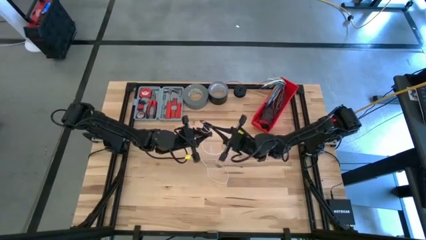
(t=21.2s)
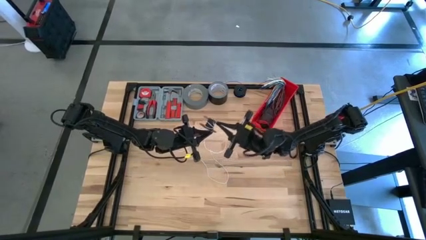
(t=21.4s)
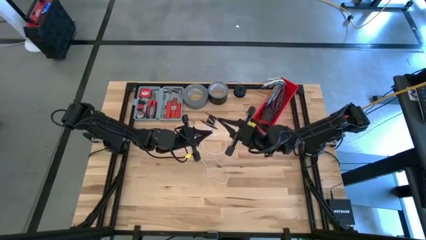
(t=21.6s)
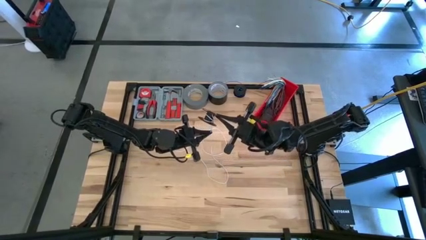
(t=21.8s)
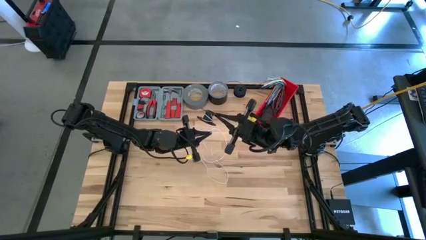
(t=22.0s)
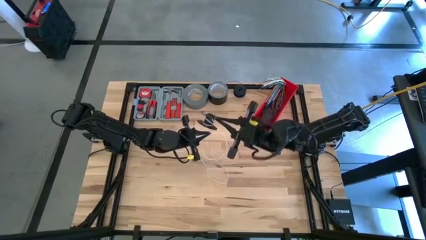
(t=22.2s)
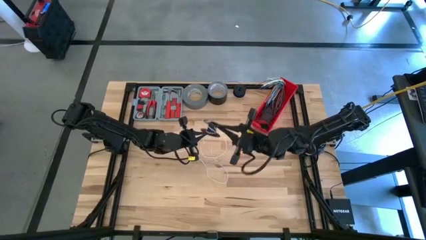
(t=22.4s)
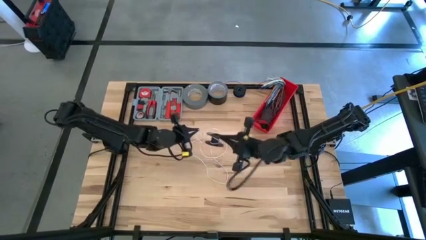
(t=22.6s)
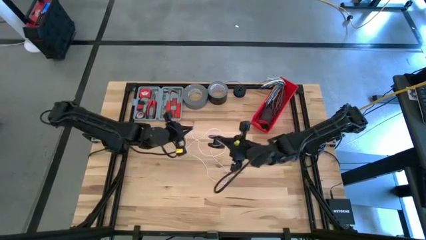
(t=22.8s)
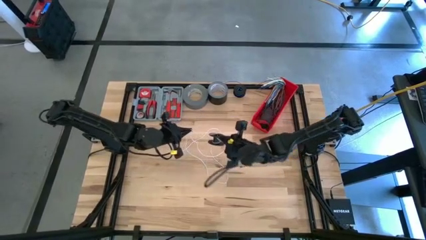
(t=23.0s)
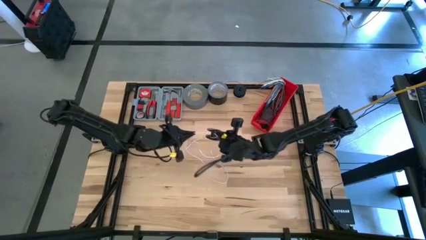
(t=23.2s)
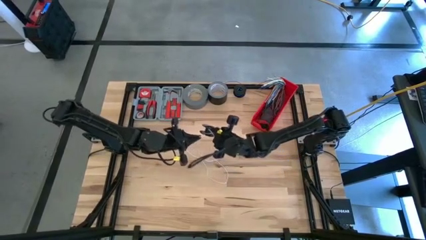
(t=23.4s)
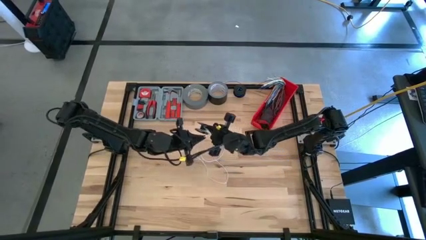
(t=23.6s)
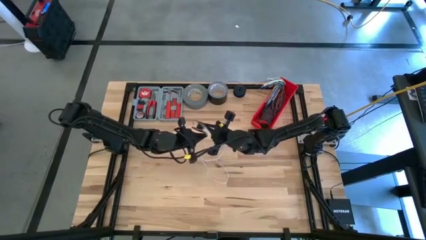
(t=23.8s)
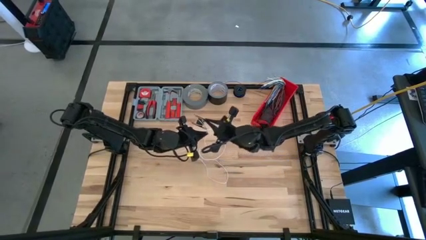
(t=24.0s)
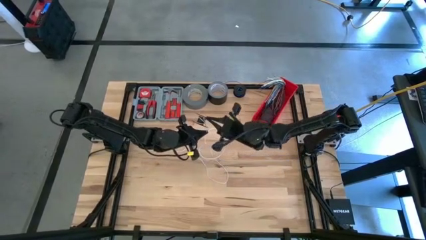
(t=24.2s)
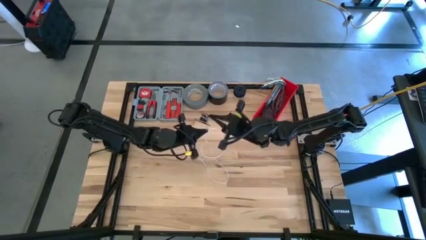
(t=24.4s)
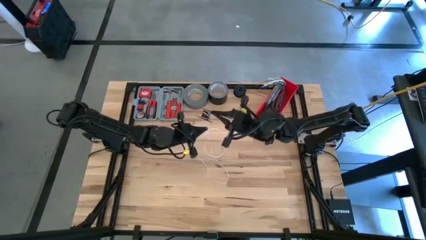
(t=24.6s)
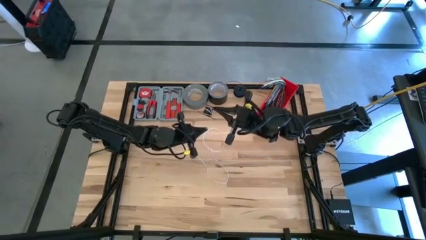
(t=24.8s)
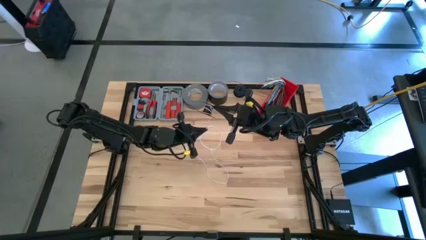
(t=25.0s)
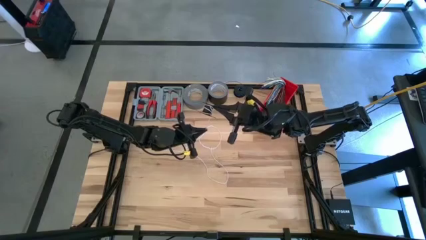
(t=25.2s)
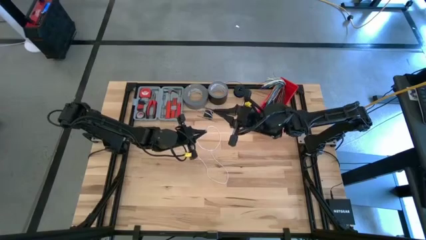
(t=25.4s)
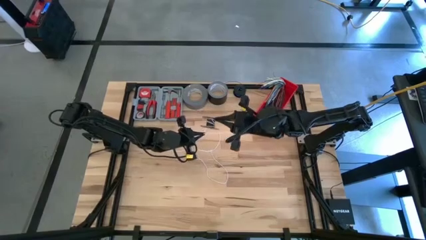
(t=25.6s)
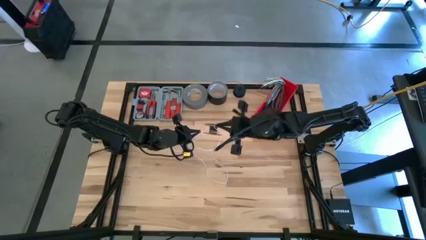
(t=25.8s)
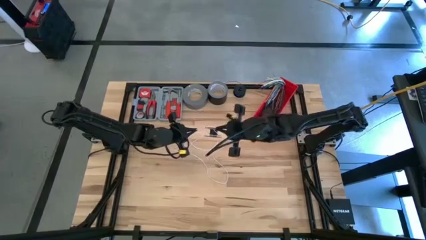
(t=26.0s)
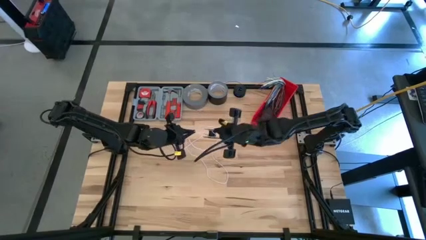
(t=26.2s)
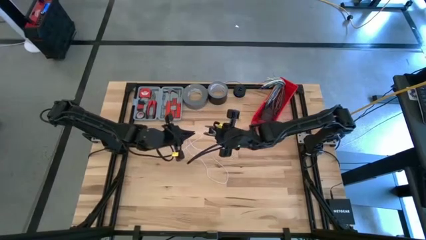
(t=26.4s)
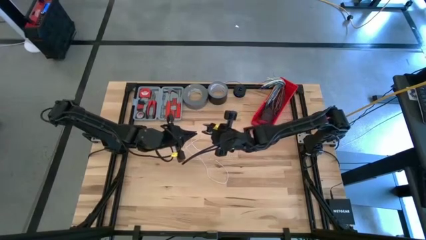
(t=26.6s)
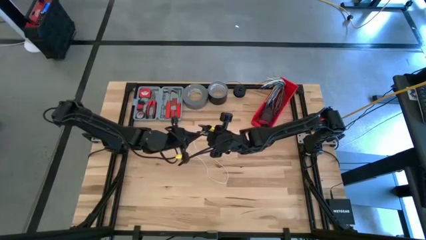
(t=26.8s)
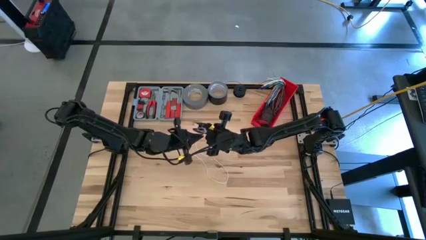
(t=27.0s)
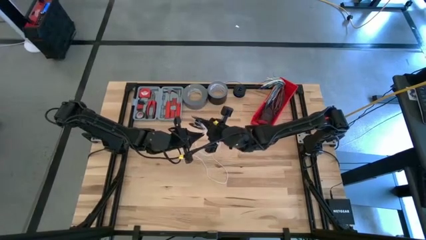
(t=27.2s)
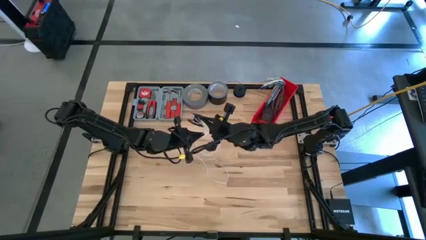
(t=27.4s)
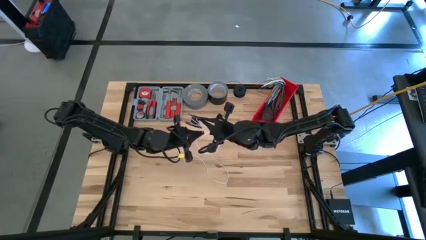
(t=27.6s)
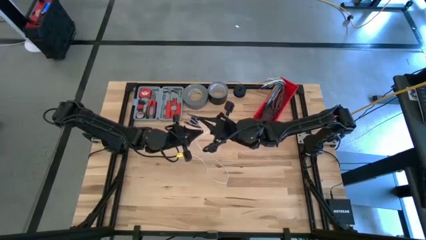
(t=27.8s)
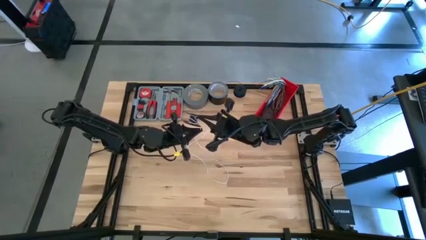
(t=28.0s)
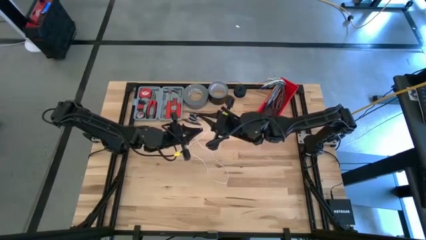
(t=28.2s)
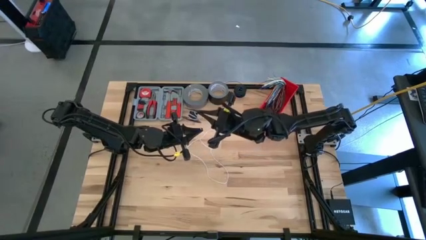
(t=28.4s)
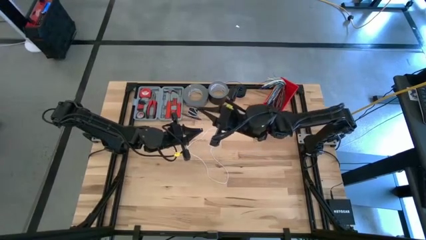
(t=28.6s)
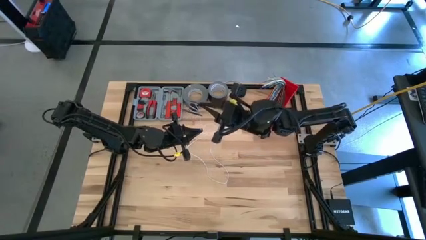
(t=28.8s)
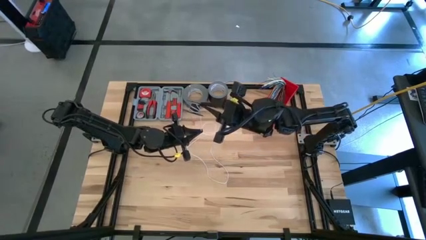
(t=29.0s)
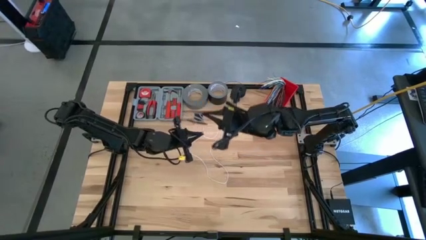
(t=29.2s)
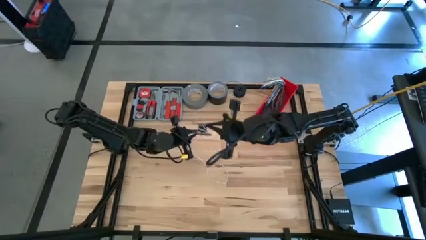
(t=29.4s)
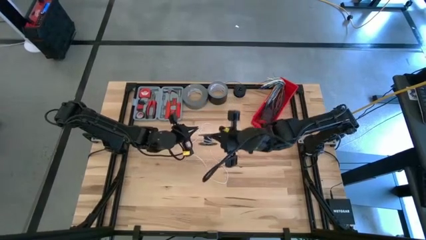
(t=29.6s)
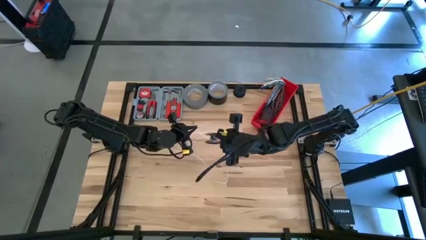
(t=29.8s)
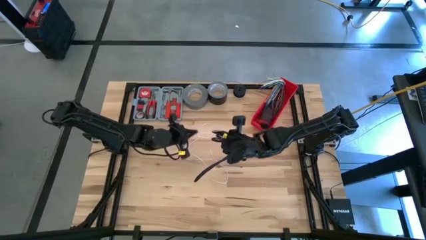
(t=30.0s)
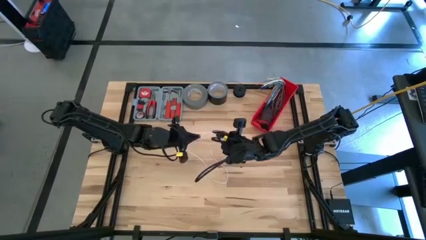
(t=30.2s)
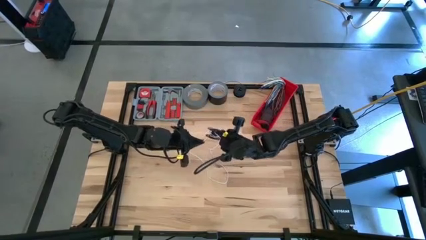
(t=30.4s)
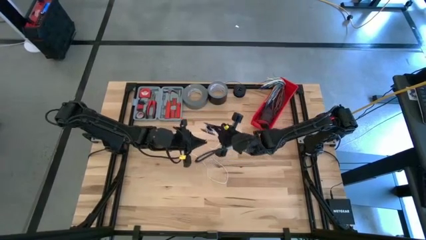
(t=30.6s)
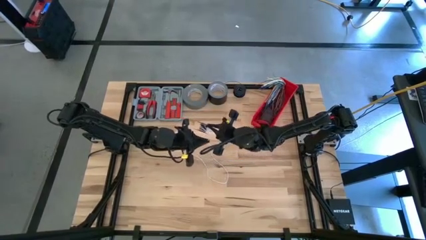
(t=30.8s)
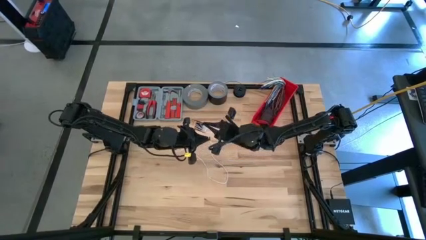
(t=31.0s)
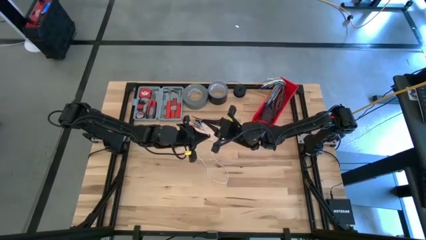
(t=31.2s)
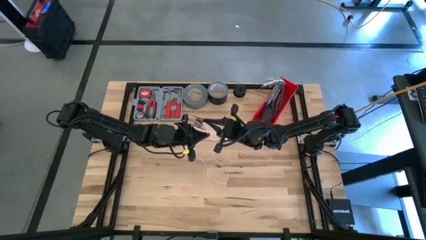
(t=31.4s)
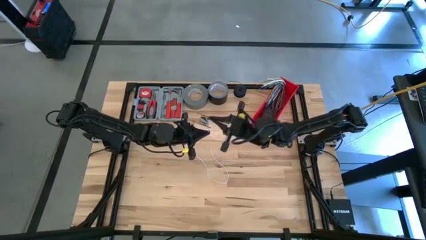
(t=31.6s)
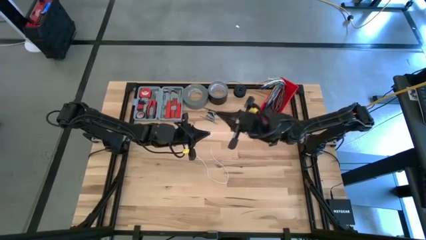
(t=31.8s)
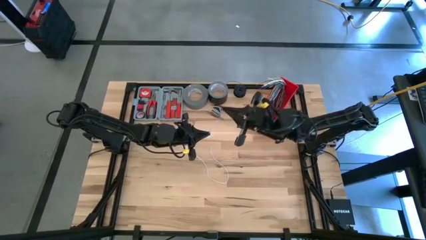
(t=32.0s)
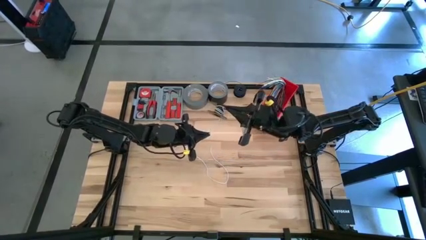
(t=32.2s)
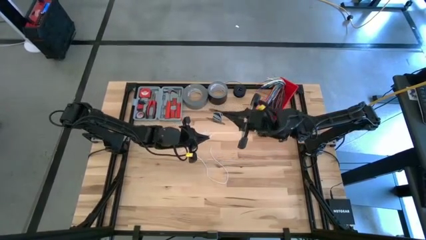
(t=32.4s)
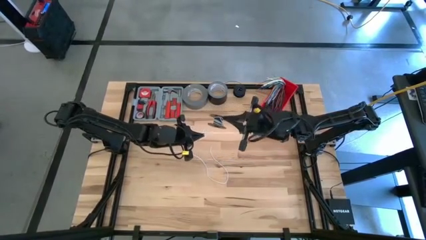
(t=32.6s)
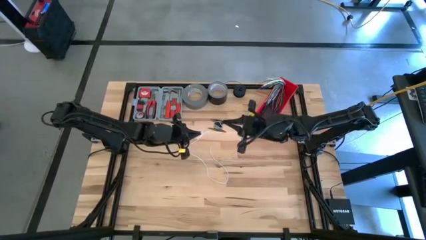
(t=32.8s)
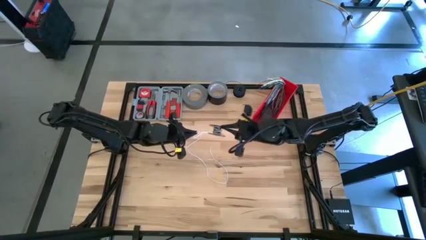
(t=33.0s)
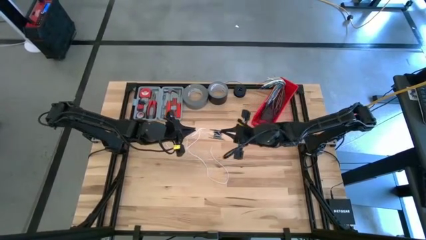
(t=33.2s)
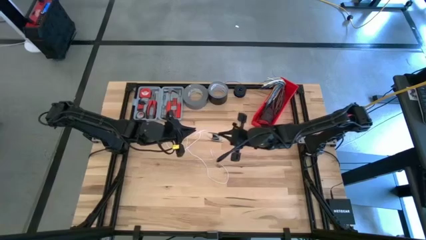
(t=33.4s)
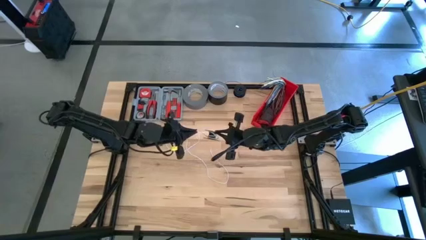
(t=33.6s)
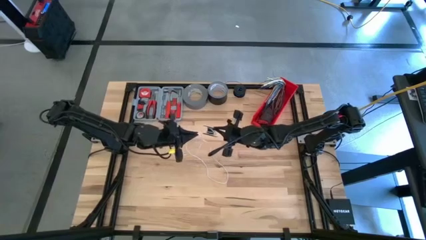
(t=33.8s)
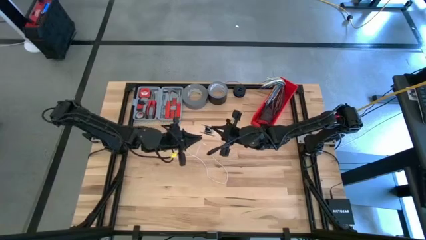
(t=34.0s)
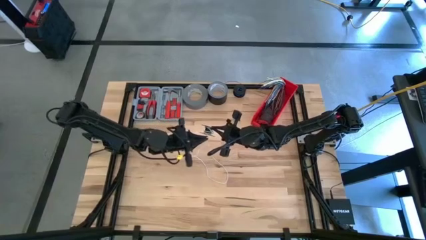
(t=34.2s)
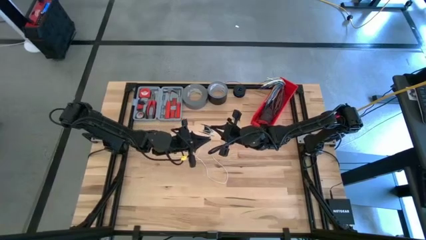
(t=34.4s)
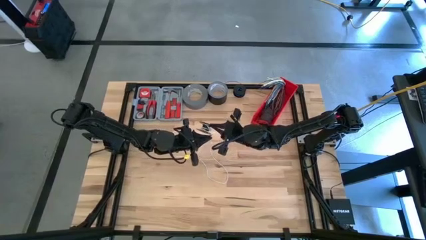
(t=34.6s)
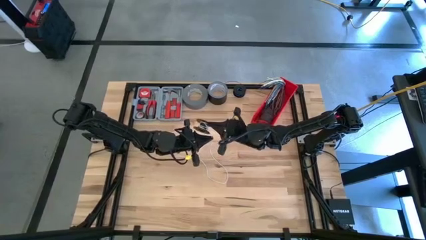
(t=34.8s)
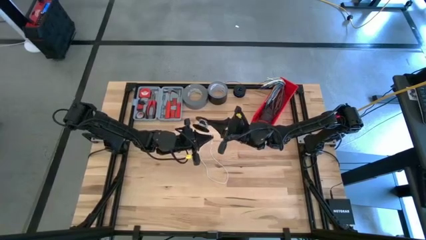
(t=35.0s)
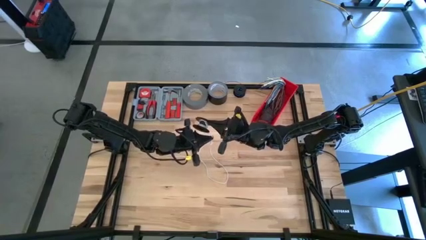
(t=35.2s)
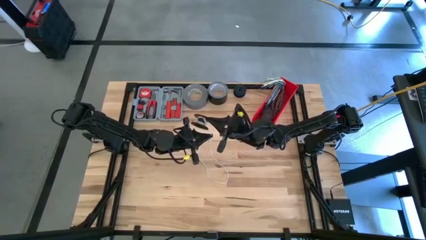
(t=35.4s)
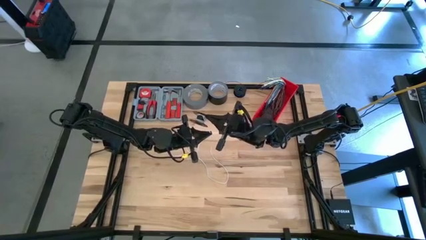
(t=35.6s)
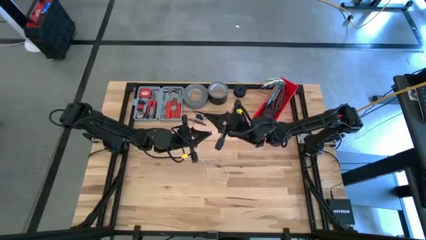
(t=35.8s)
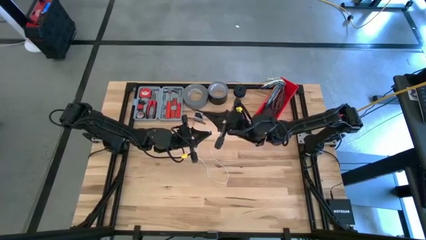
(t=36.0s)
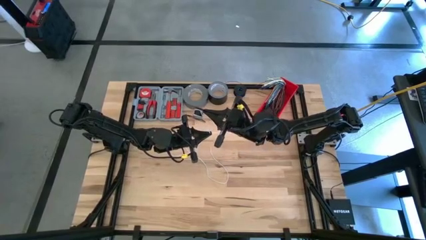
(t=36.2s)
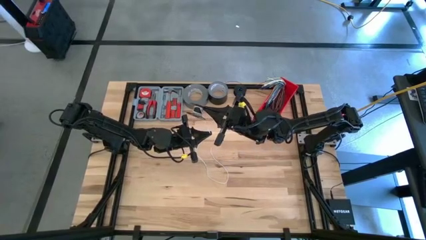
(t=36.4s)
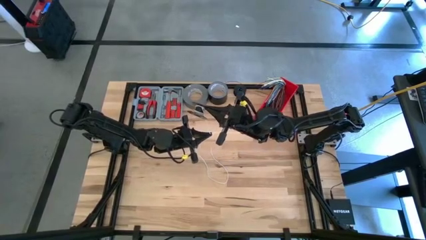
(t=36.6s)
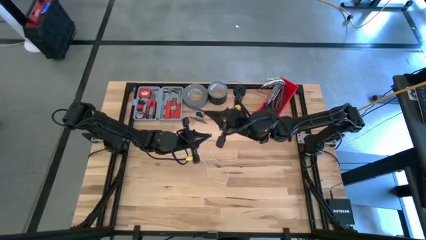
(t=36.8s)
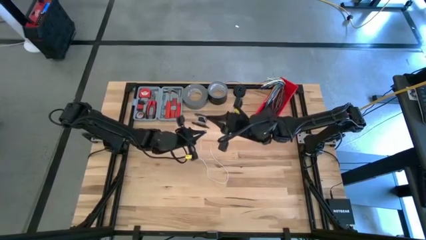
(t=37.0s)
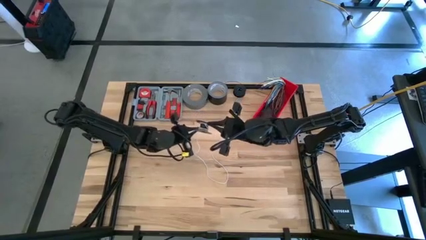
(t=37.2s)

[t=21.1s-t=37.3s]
Task: Coil cords
Coil the white wire onto the spool
